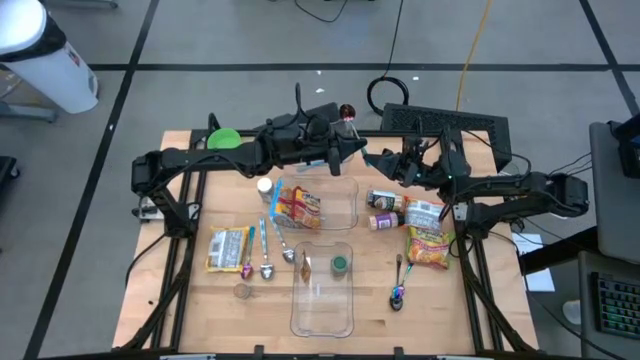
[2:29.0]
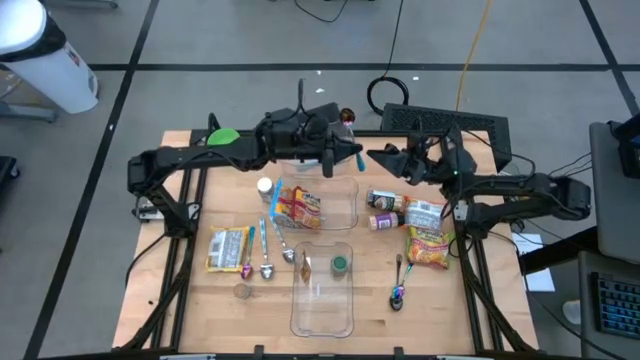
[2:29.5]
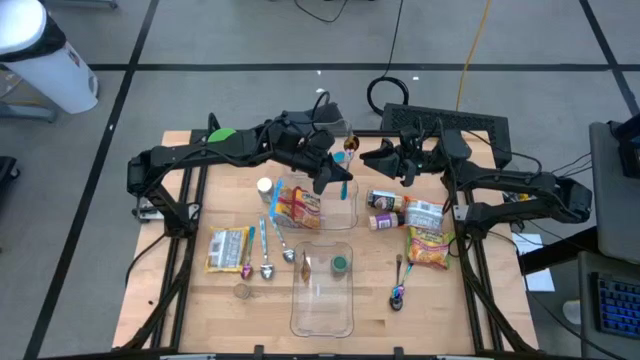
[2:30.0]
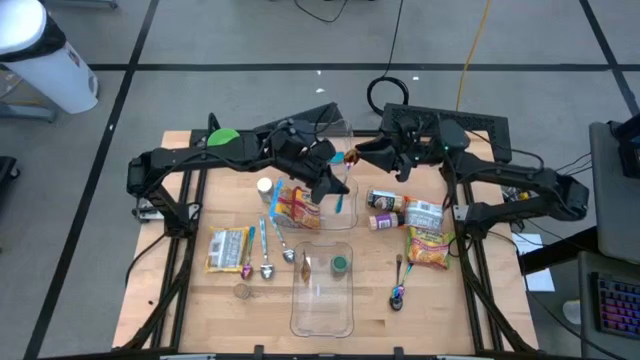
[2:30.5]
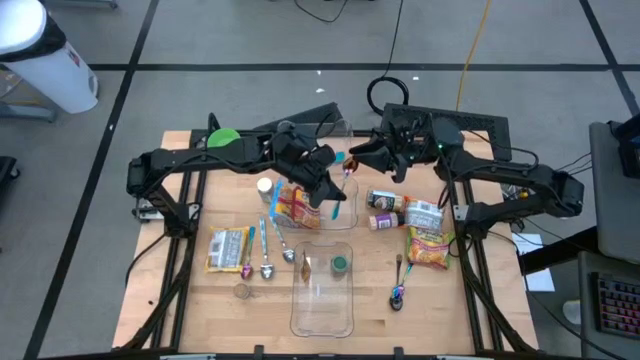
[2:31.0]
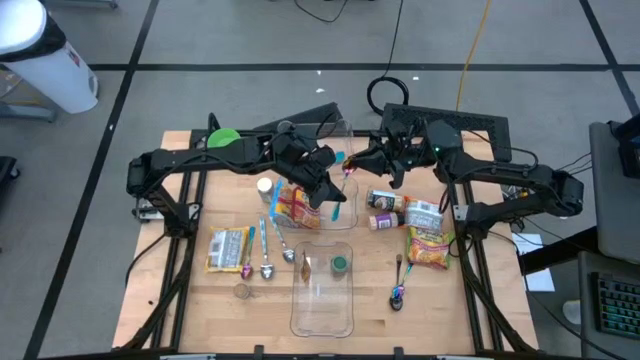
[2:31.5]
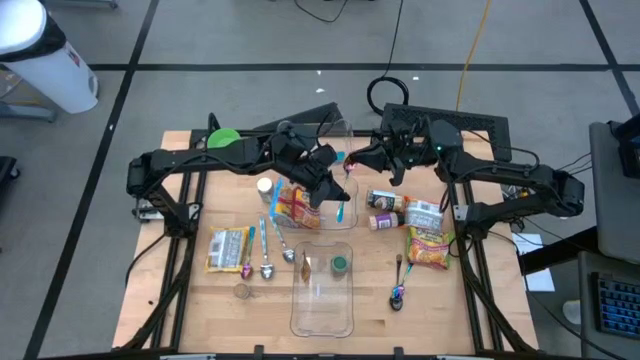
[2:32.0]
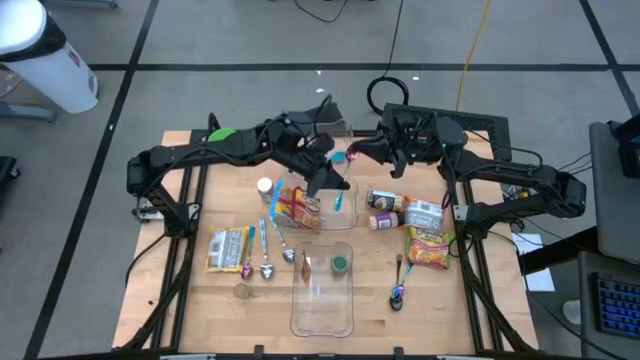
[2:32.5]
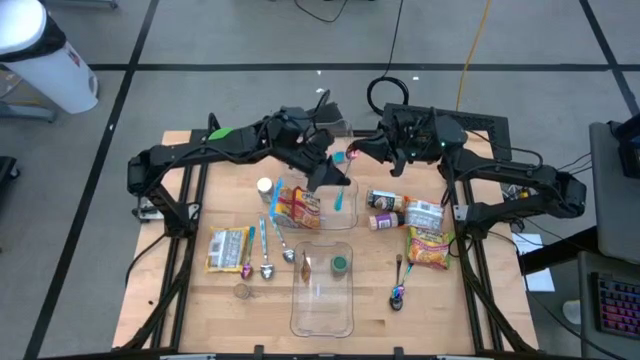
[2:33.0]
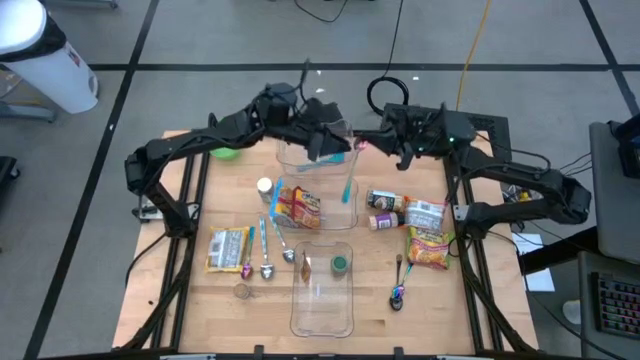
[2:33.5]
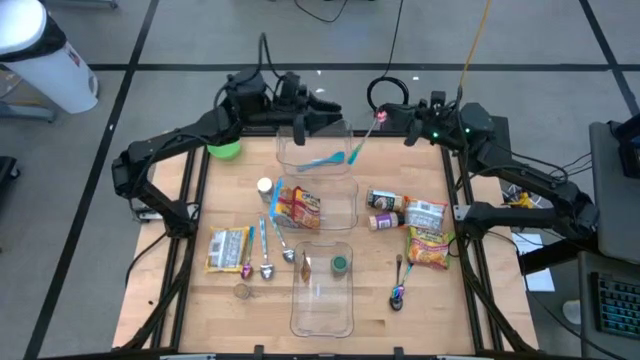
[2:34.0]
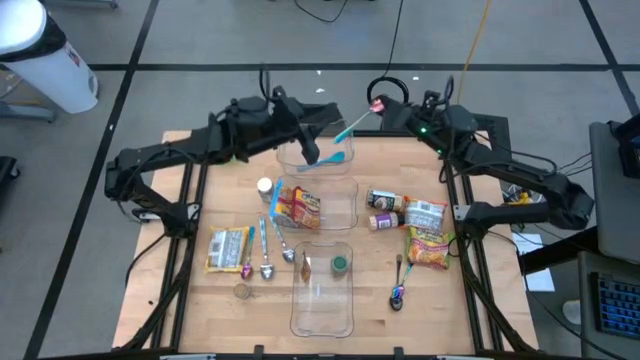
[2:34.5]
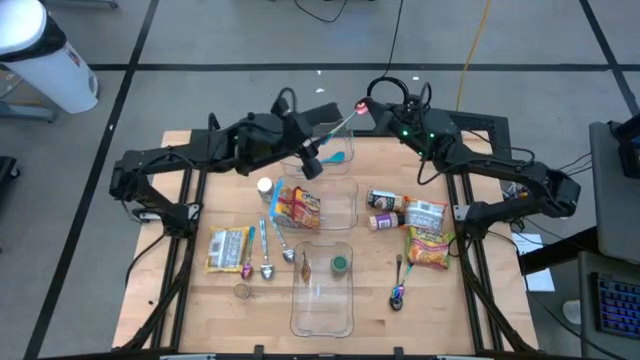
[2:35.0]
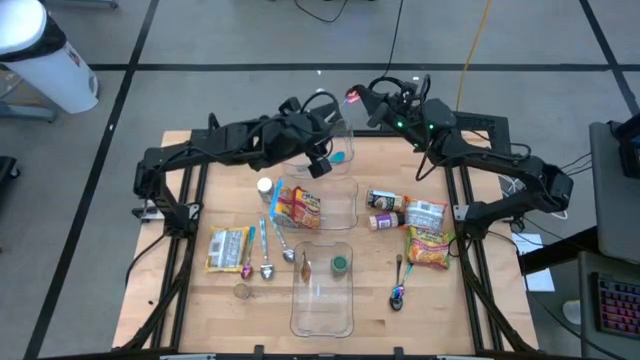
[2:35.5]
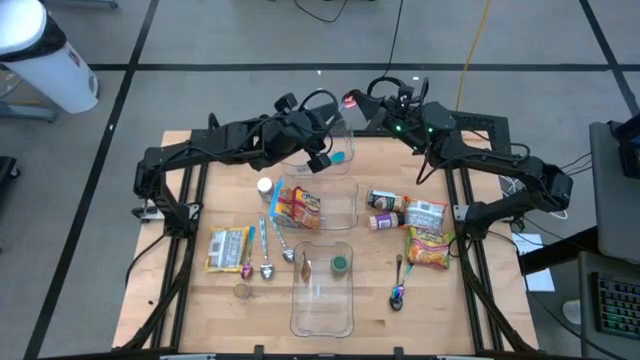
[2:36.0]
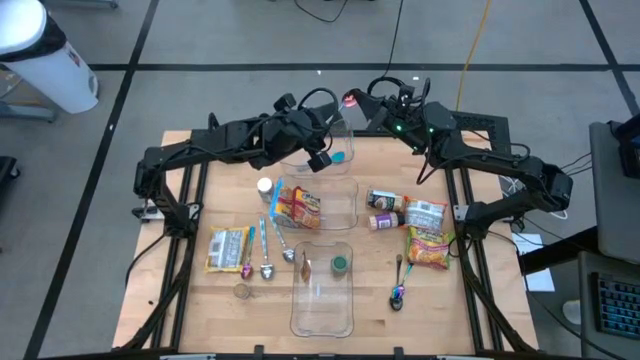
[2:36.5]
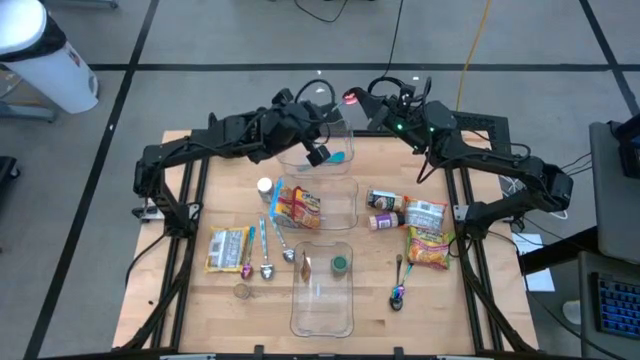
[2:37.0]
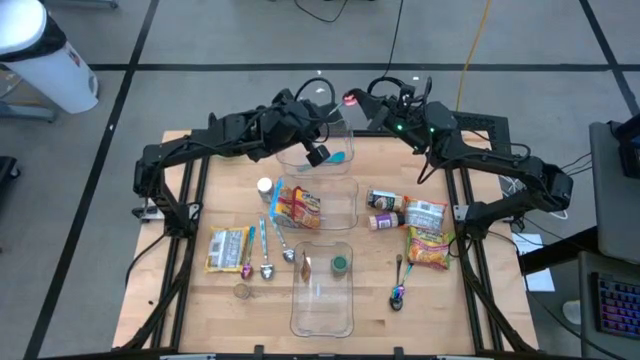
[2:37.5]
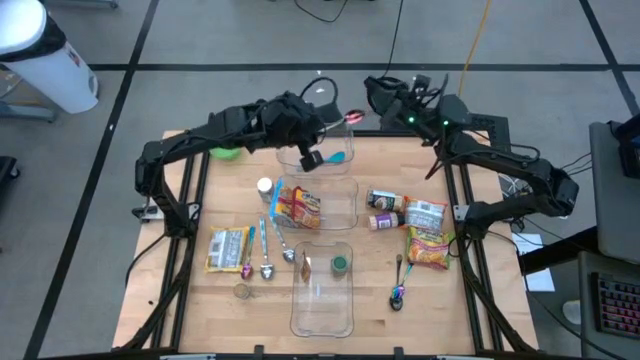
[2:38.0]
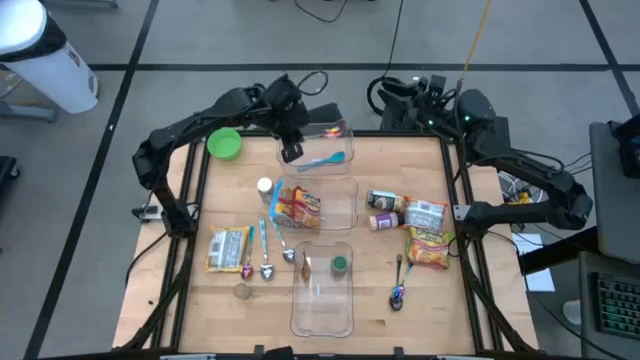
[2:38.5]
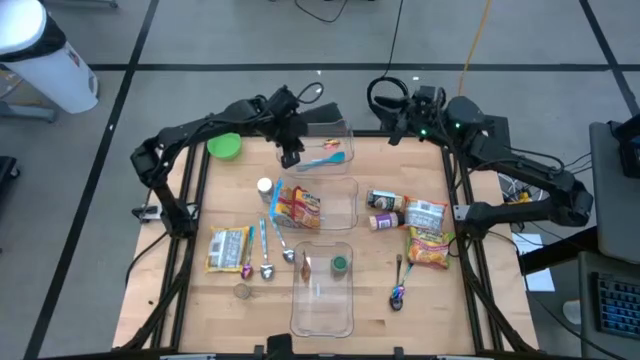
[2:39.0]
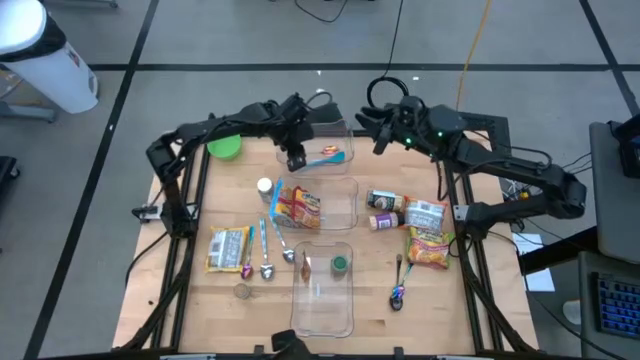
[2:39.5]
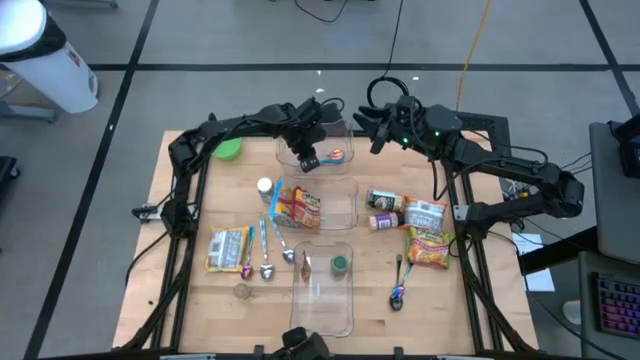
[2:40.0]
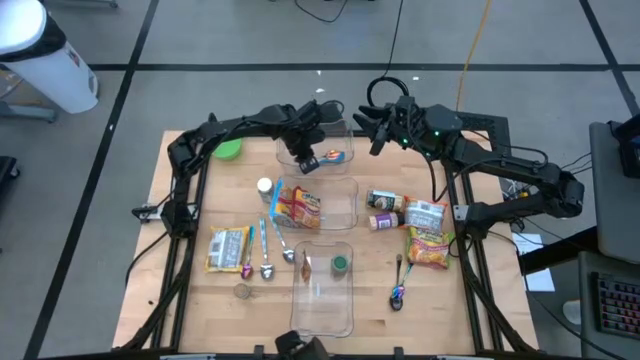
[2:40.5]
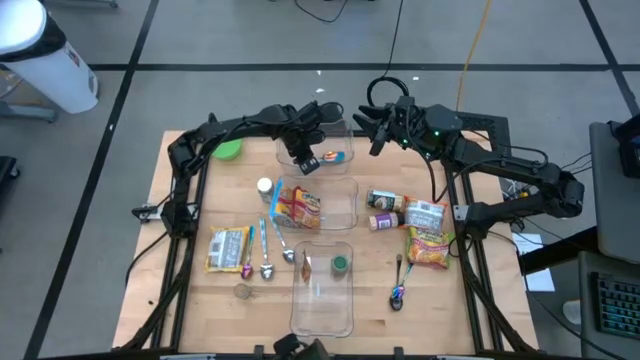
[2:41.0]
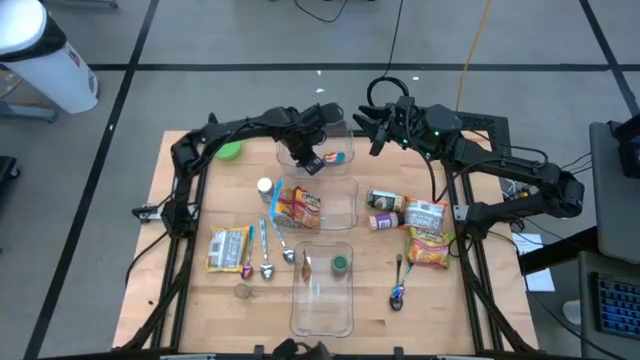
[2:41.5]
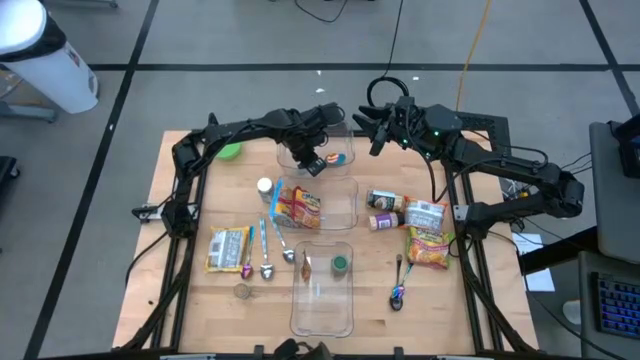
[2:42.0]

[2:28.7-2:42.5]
Task: Pick & Place Food Item
Put the green spoon into the top transparent bin

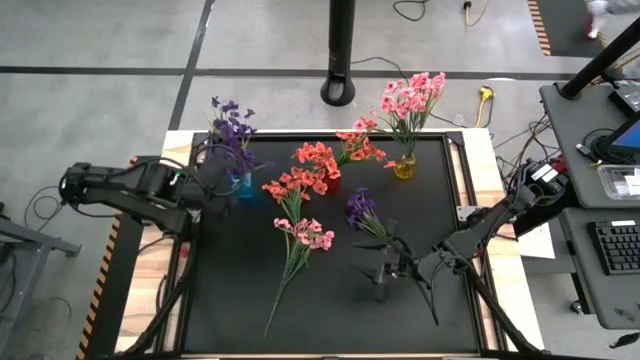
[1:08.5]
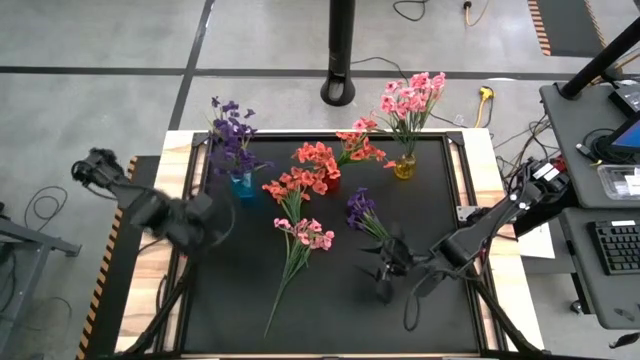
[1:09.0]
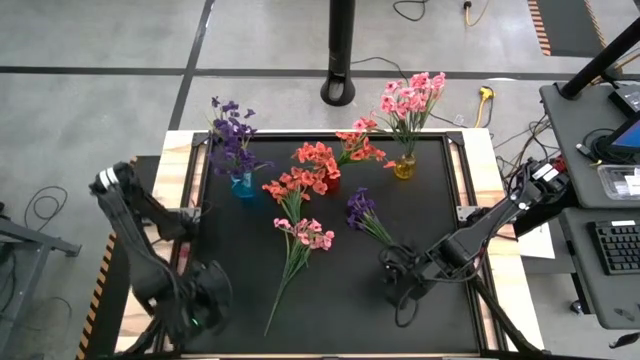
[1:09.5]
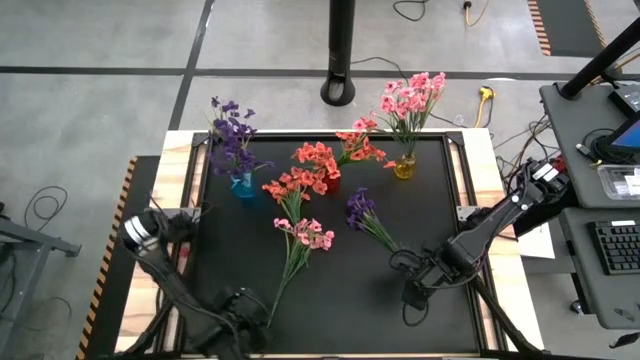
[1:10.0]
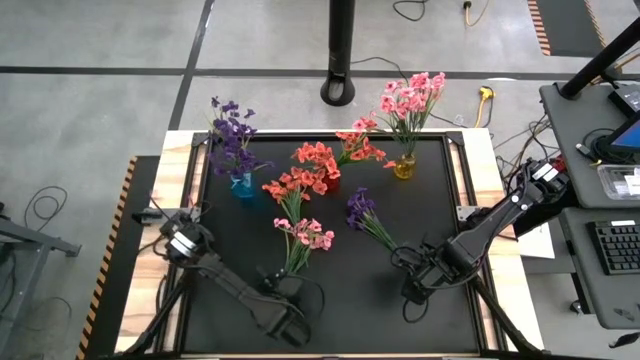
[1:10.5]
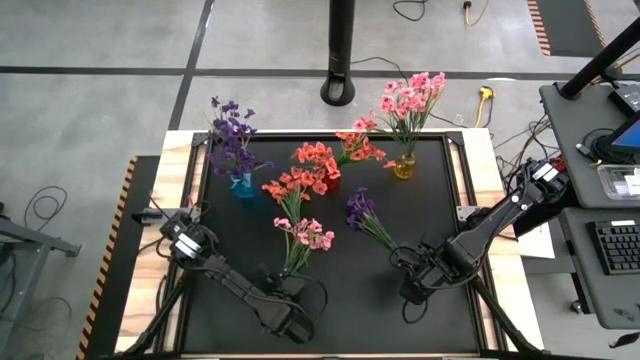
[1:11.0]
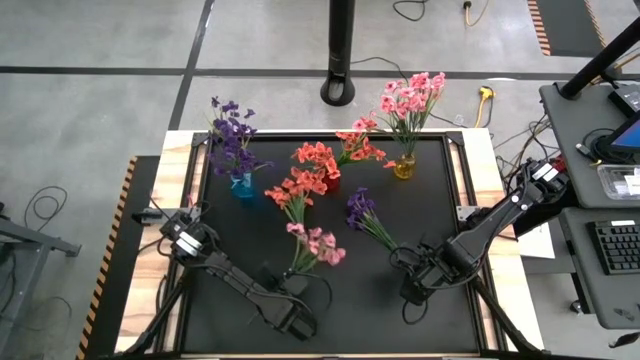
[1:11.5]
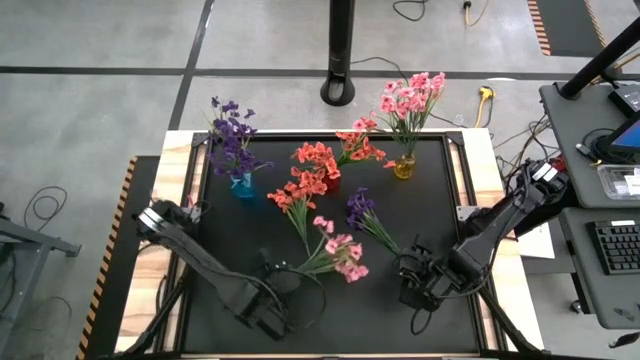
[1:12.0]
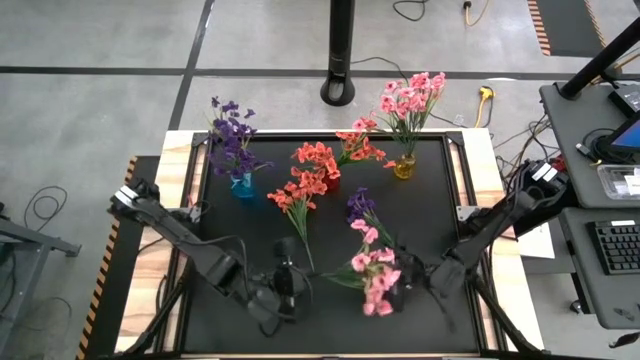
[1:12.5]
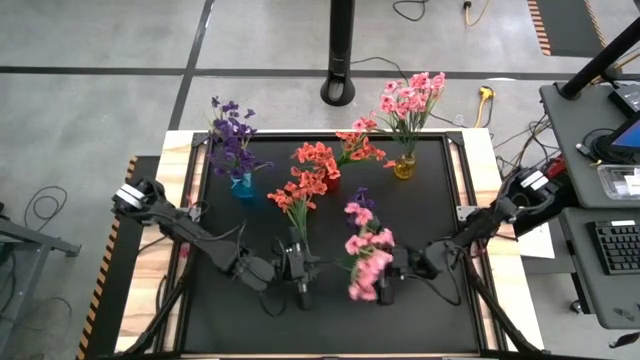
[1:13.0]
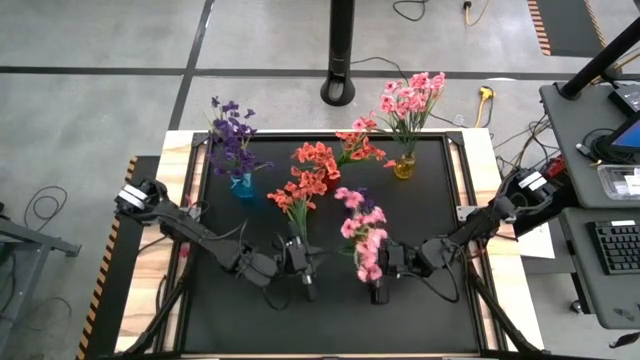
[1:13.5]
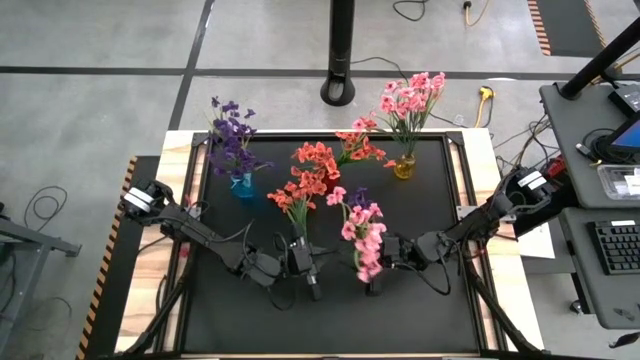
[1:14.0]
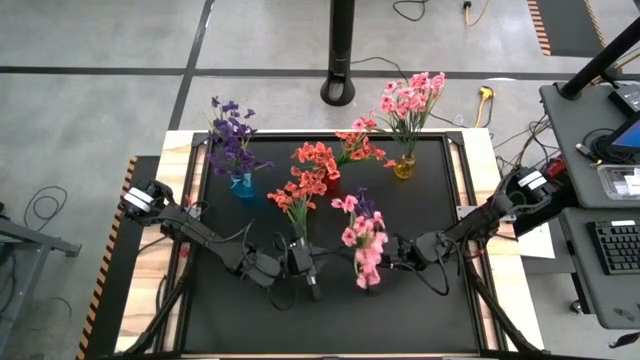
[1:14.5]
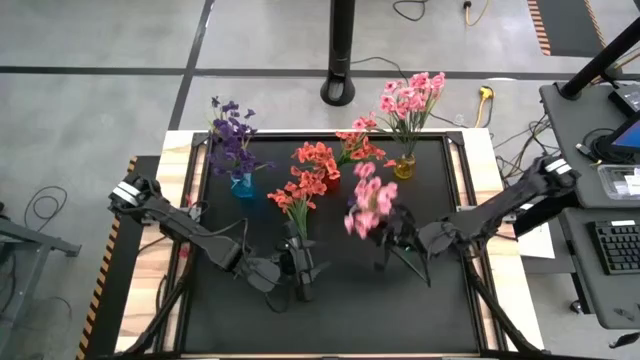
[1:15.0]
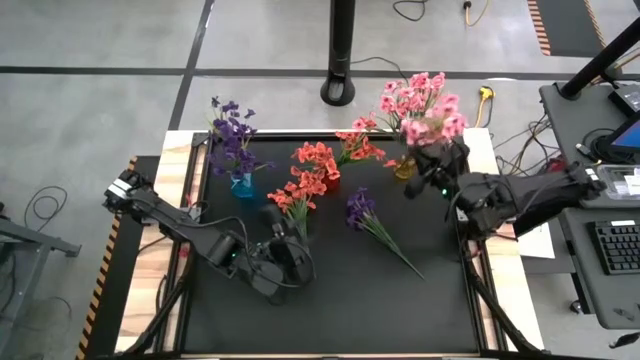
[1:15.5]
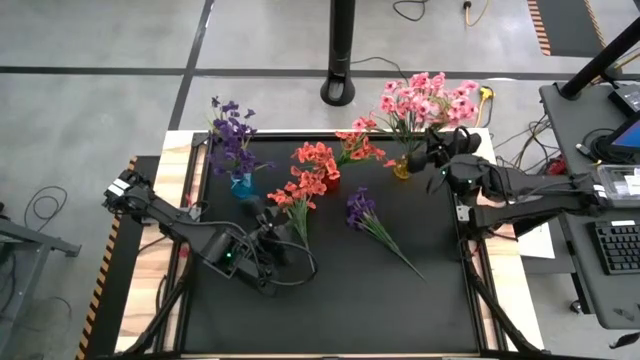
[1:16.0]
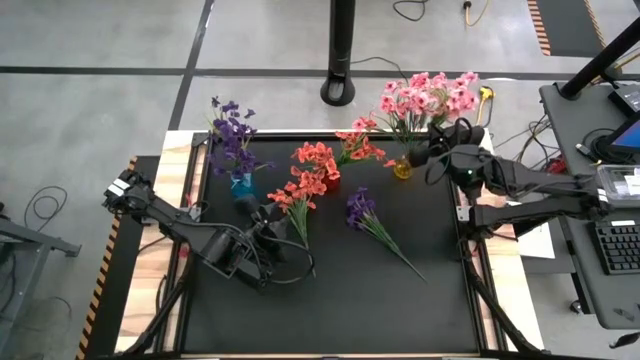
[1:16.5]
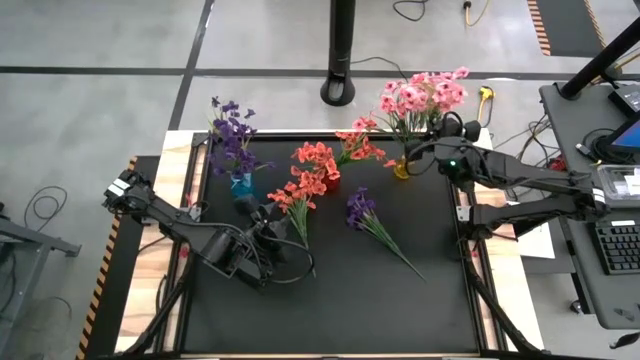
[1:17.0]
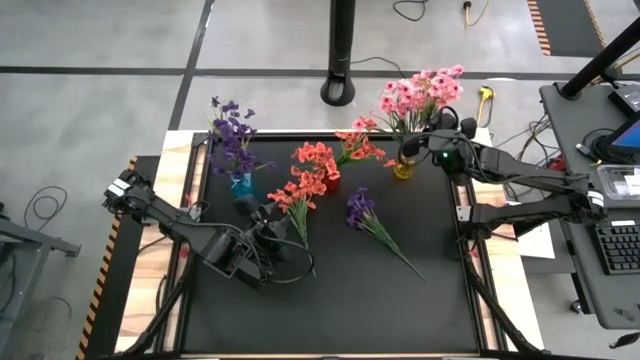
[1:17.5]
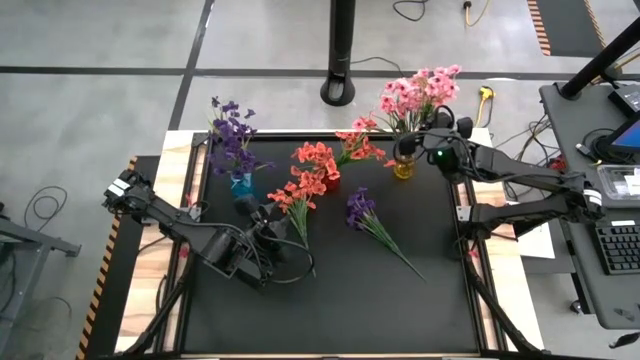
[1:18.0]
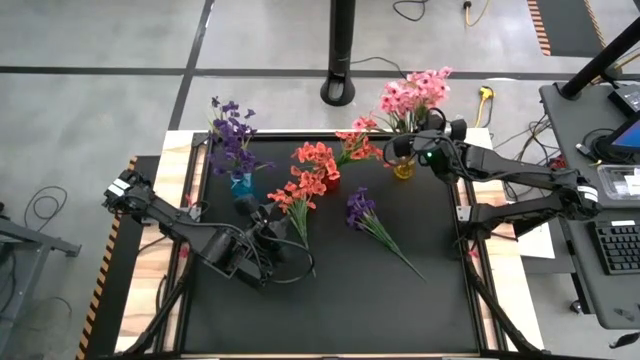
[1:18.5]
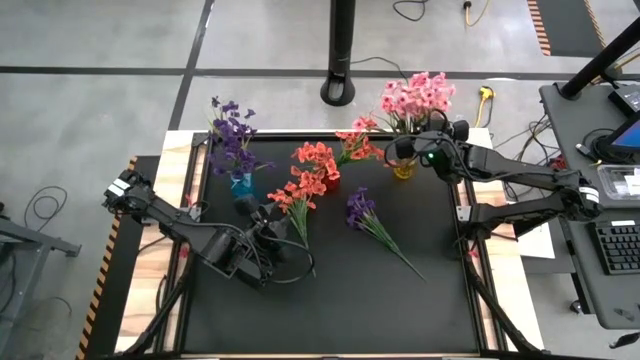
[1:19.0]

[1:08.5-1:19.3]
Task: Sort flowers into vase by color
Put the pink flowers into the yellow vase
